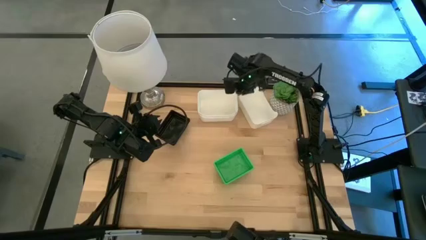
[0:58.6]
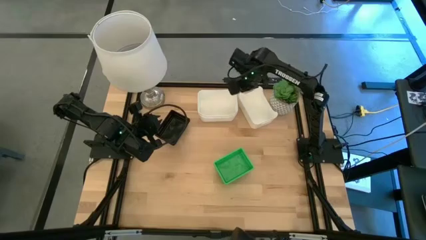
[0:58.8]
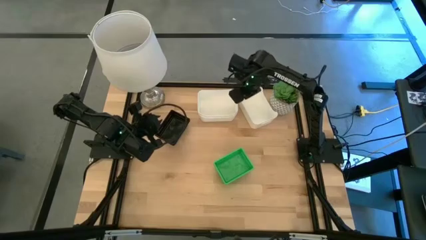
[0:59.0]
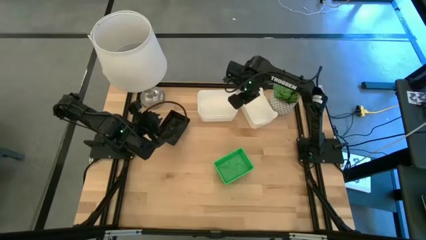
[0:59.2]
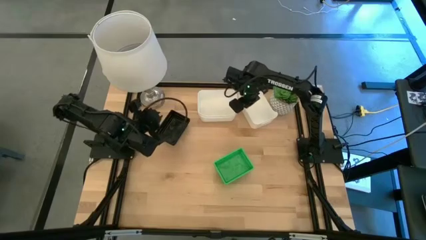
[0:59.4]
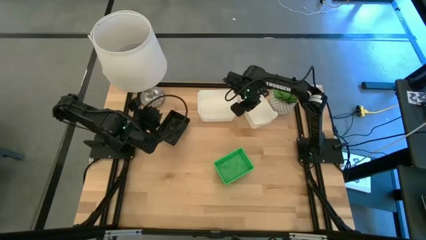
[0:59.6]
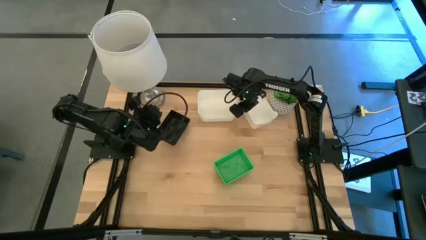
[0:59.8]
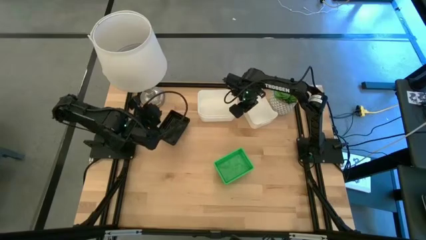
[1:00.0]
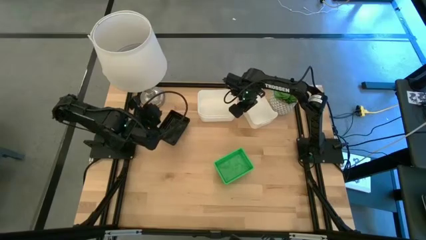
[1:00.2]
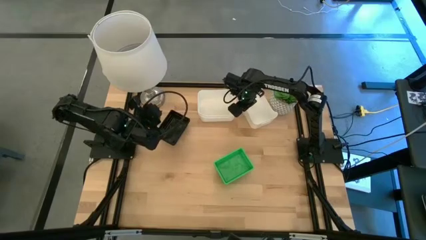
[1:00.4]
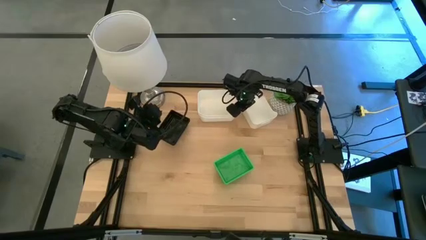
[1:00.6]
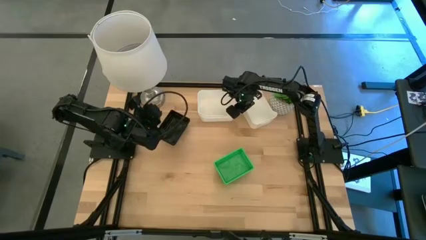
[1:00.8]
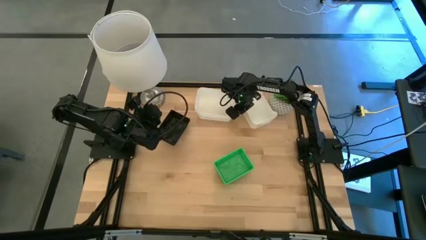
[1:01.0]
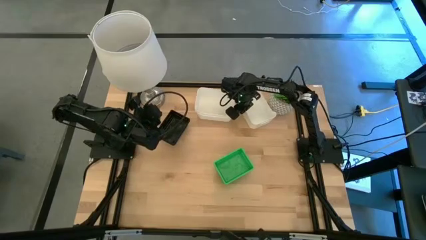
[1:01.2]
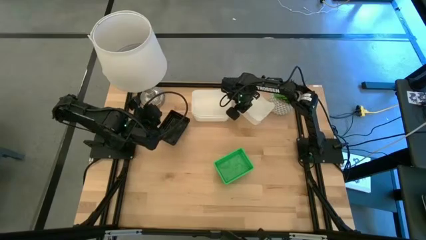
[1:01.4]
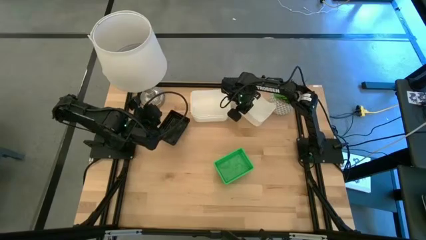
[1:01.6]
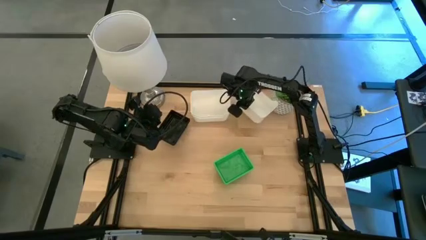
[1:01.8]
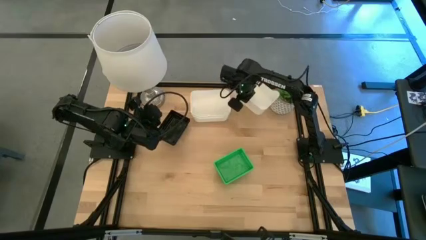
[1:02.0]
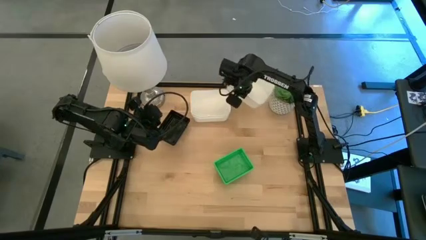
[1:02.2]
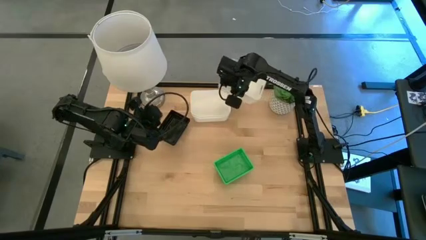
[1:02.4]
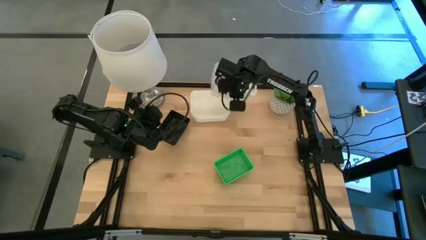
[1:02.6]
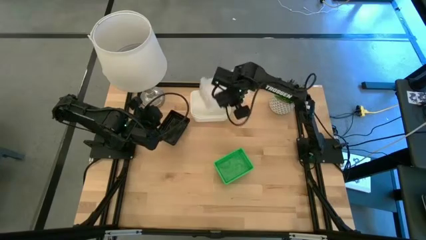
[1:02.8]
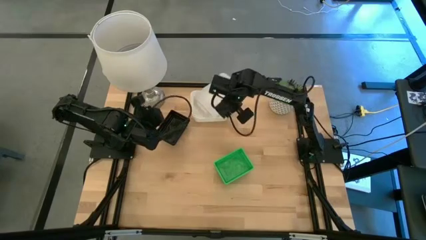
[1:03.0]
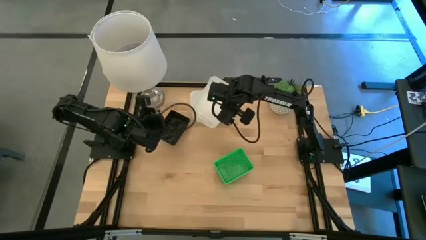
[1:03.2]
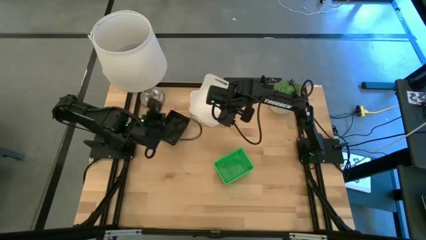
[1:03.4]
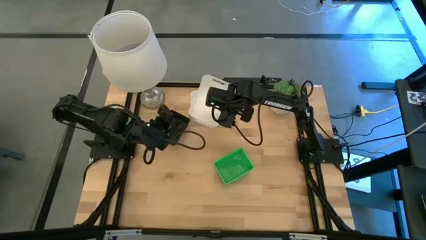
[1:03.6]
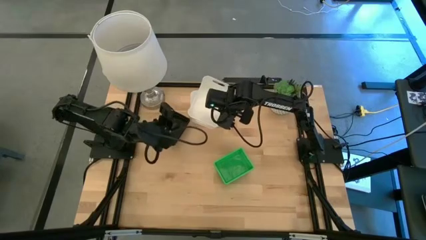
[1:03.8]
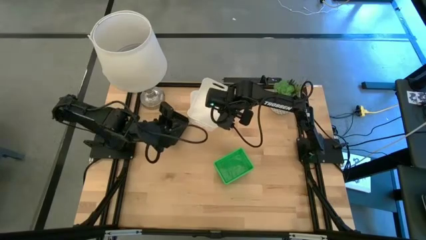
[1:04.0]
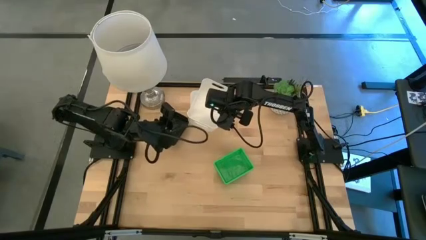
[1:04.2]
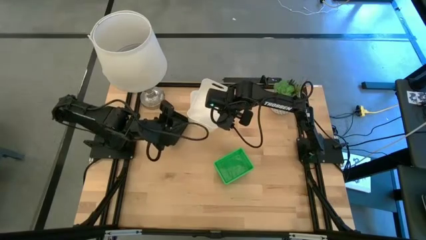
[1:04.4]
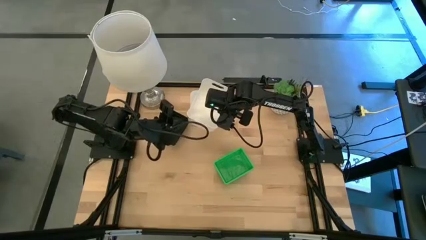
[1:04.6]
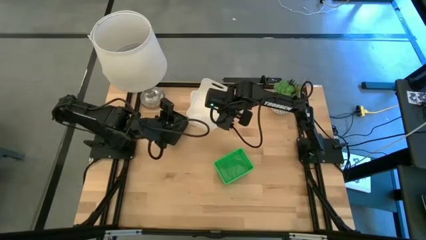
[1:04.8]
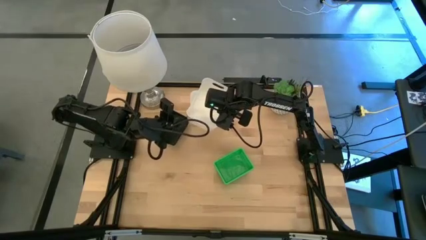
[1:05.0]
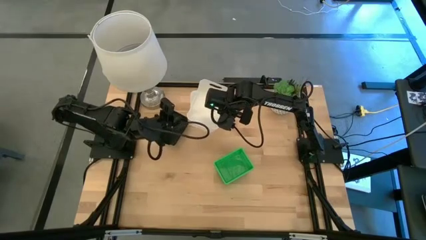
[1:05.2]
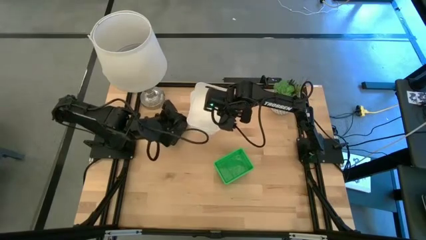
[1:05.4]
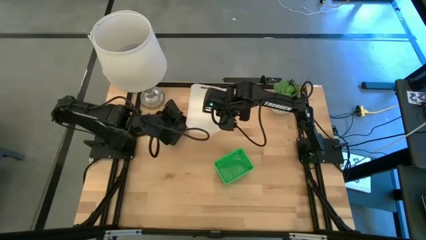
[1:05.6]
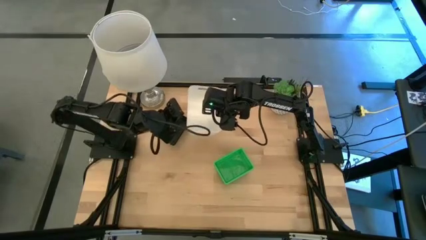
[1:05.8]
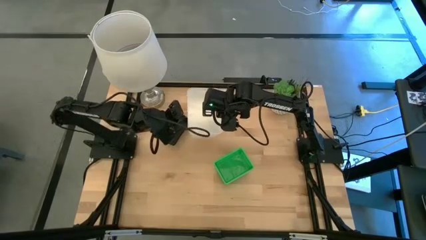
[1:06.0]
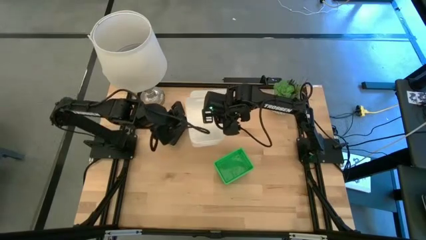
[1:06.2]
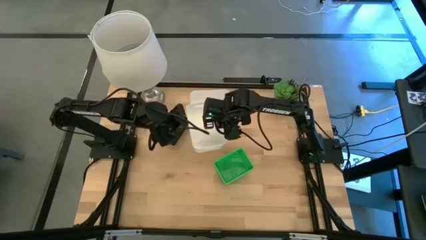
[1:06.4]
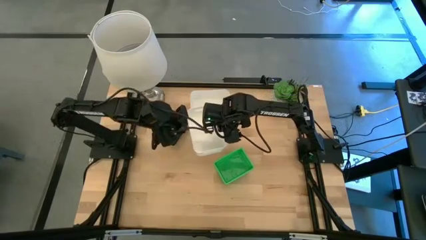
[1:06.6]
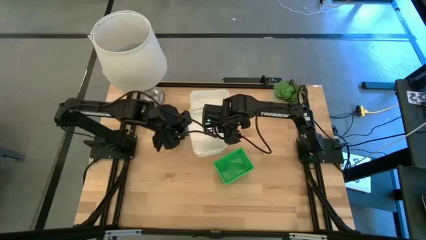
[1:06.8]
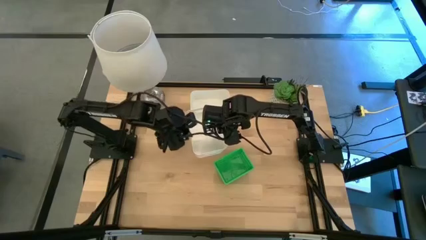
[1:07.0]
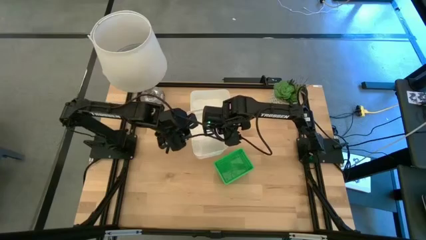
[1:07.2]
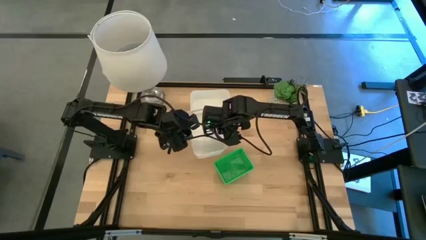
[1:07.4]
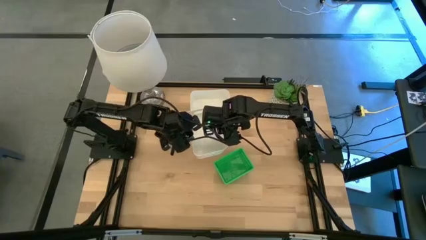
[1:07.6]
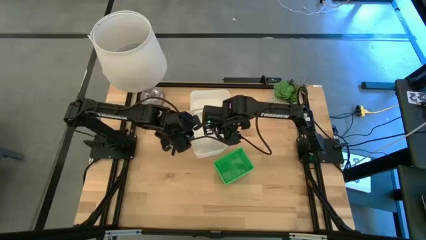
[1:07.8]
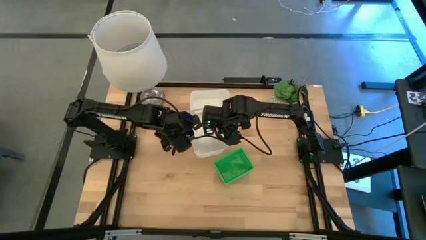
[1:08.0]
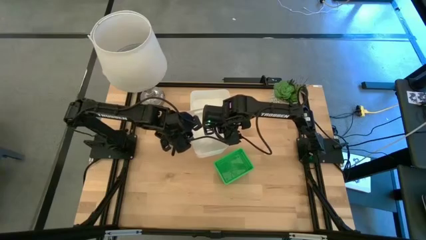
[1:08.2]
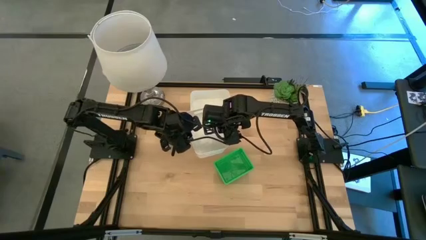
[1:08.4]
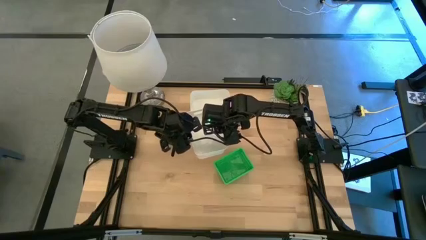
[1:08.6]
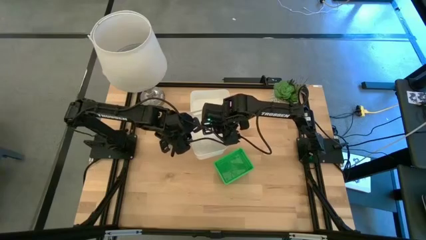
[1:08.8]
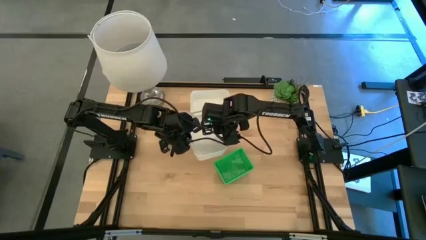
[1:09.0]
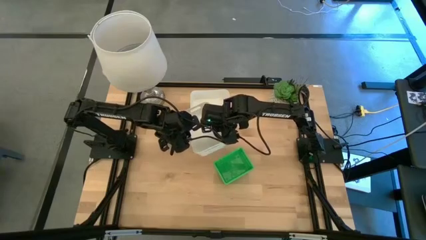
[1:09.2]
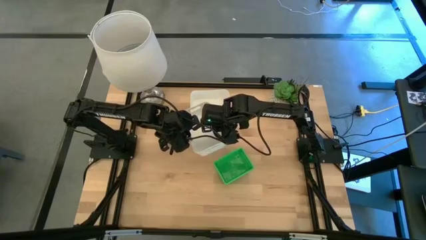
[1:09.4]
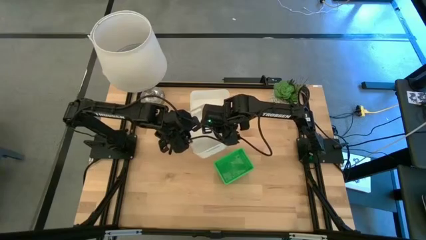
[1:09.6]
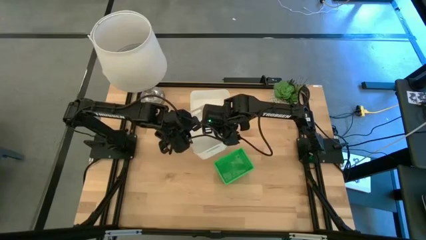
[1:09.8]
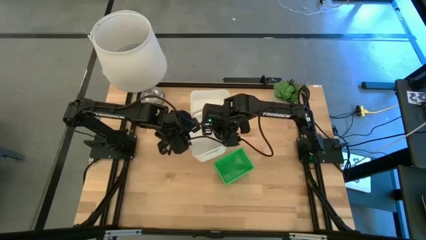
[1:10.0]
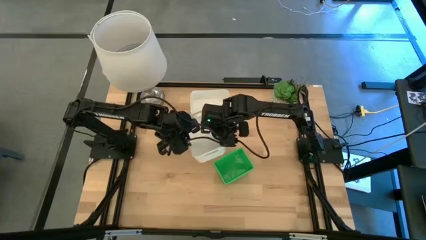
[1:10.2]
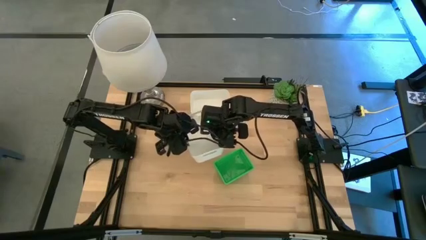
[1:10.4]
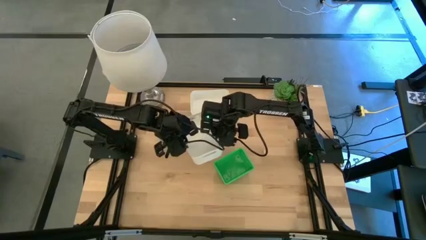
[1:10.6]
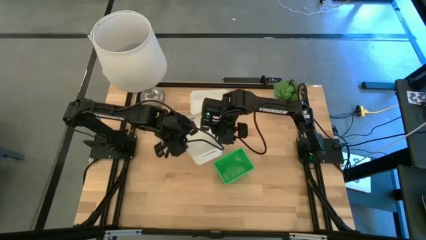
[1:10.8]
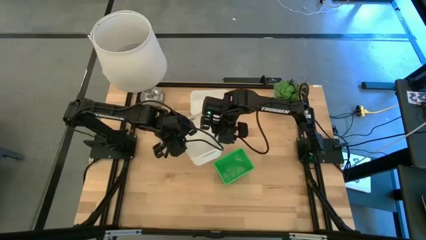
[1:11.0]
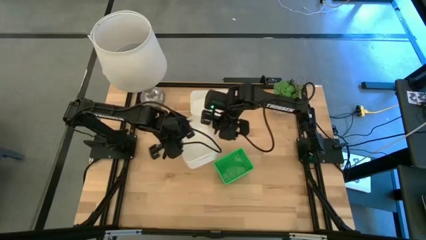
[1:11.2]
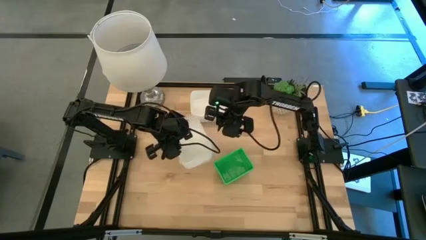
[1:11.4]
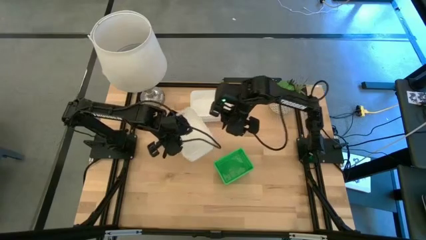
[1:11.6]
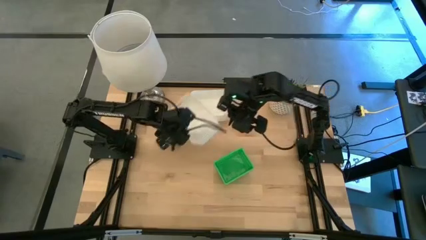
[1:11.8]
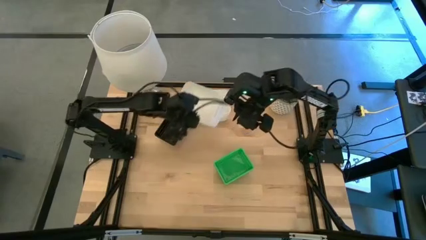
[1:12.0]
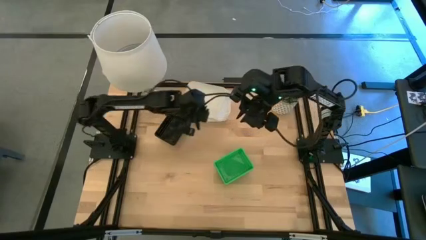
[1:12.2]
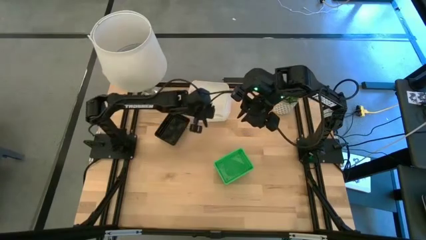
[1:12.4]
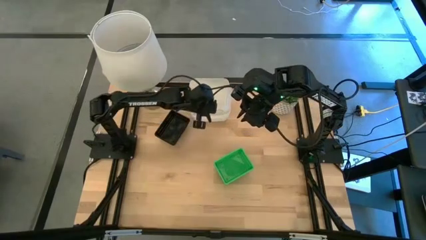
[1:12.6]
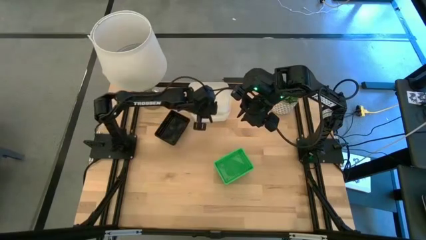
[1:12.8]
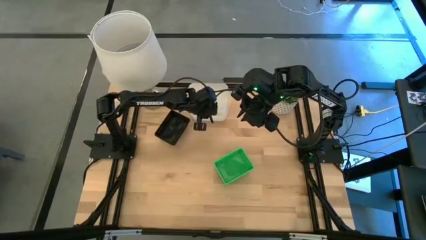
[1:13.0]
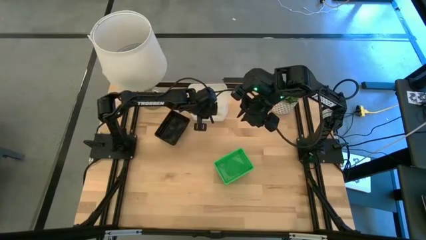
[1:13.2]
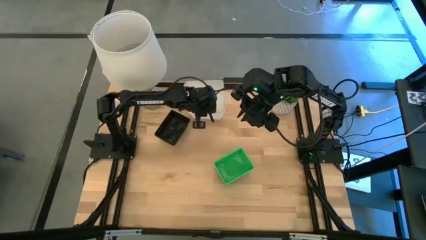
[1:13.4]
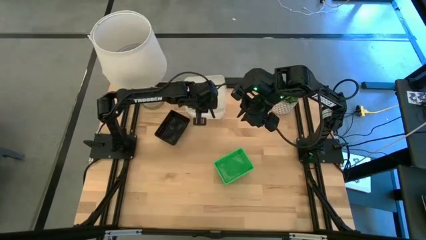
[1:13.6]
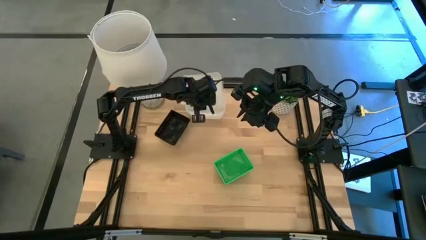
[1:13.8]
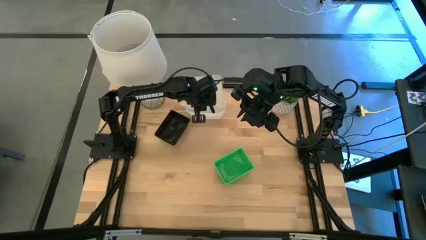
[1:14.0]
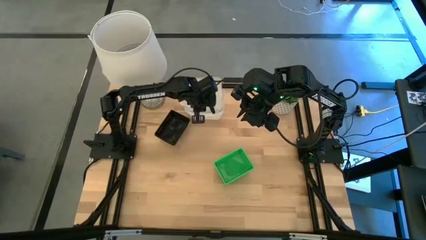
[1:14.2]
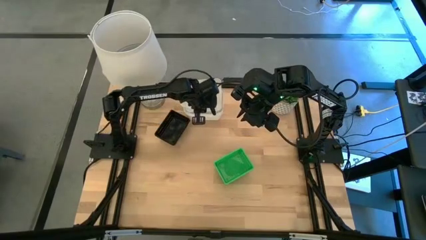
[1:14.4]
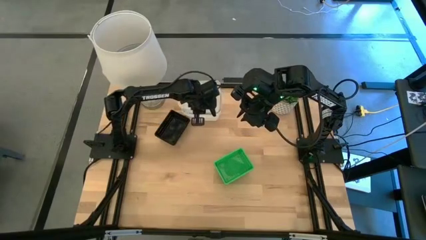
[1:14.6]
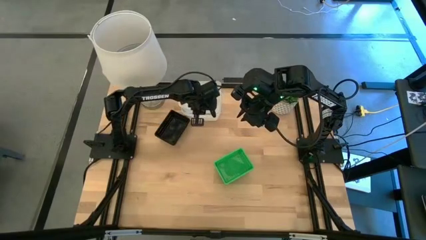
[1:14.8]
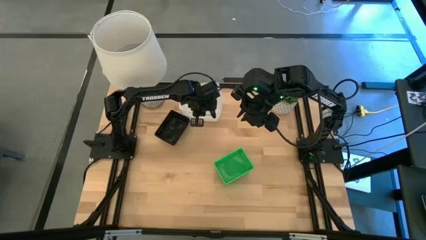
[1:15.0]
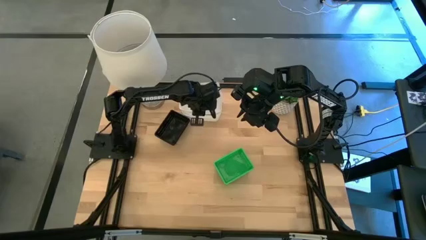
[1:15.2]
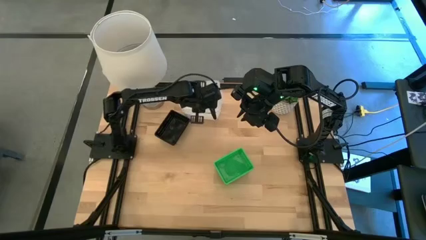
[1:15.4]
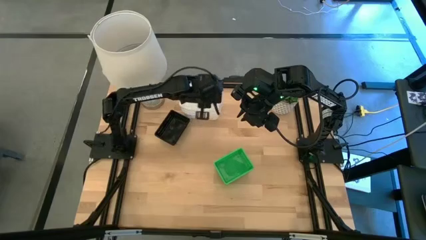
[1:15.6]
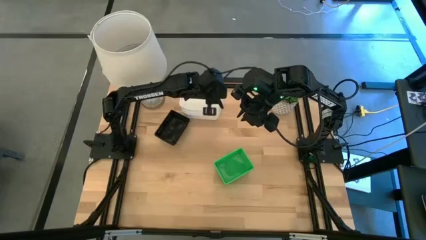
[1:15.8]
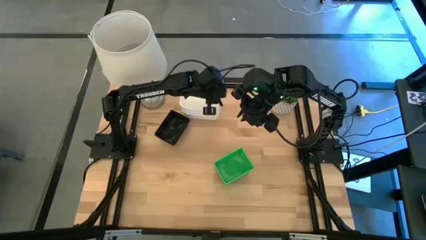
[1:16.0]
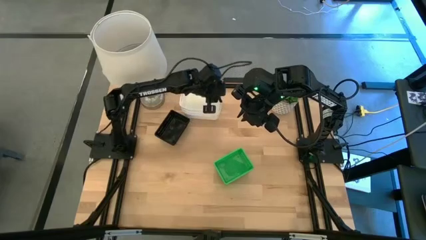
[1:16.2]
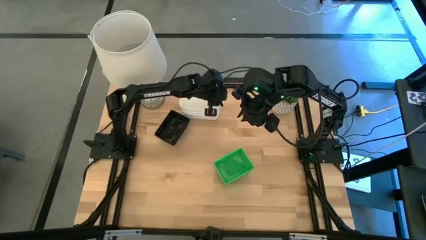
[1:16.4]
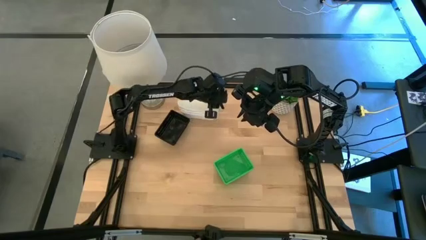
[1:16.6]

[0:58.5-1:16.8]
Stack the right white bin on the left white bins
